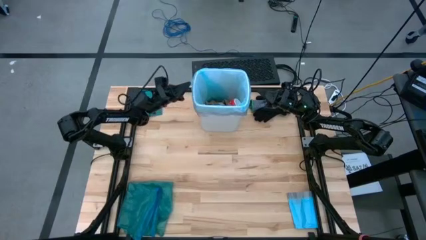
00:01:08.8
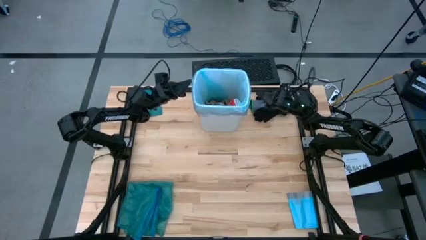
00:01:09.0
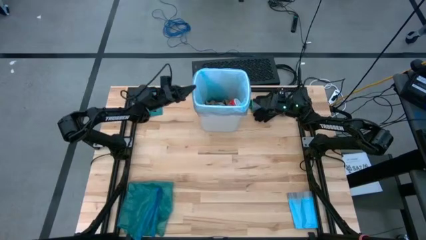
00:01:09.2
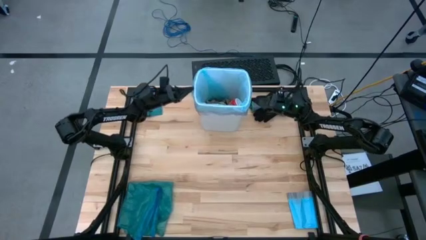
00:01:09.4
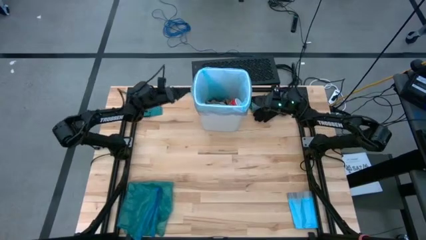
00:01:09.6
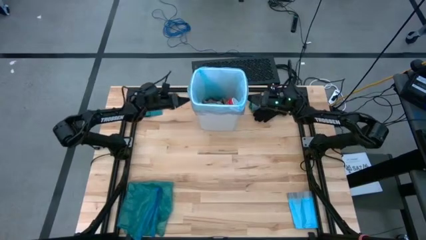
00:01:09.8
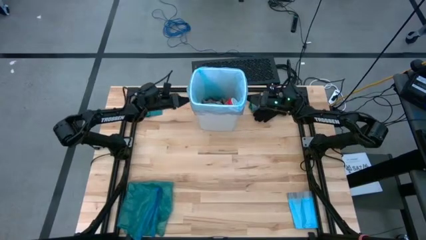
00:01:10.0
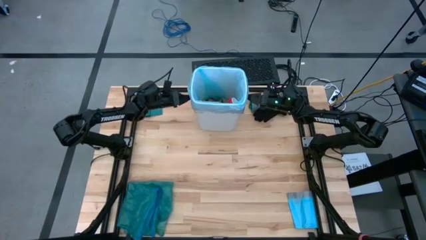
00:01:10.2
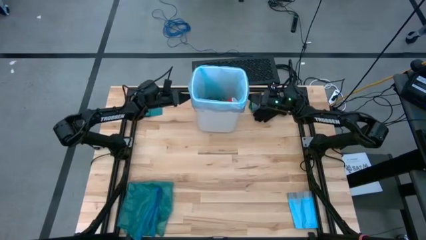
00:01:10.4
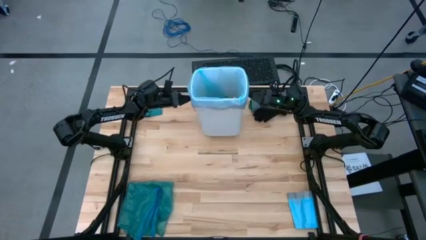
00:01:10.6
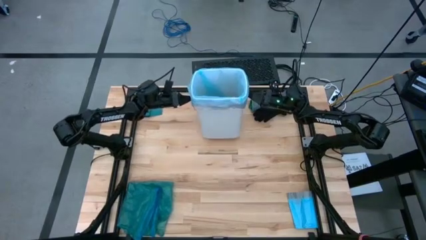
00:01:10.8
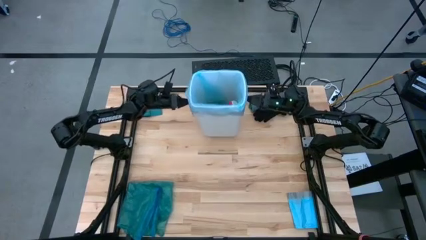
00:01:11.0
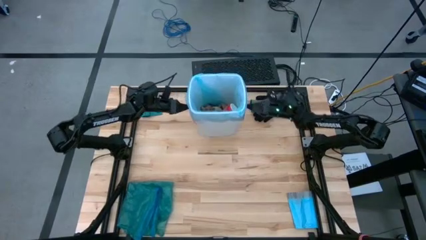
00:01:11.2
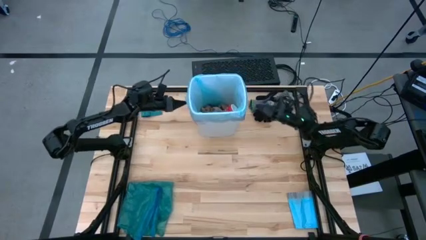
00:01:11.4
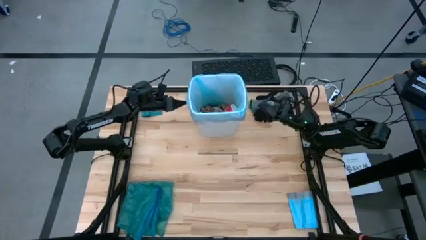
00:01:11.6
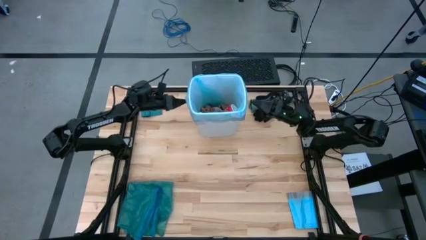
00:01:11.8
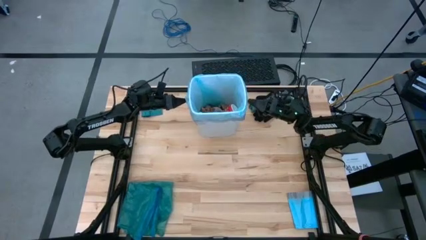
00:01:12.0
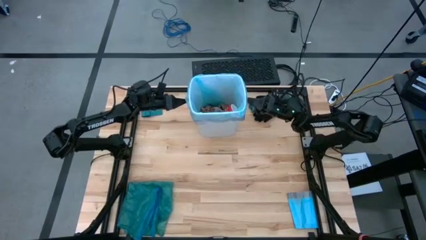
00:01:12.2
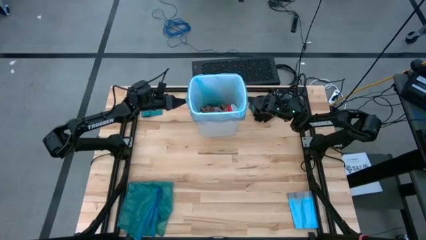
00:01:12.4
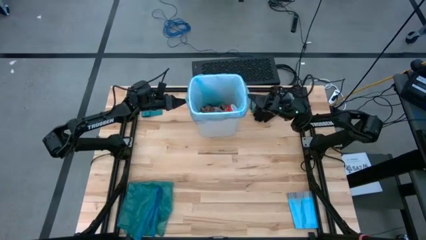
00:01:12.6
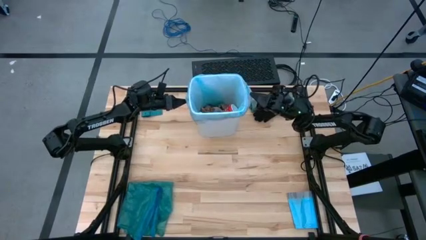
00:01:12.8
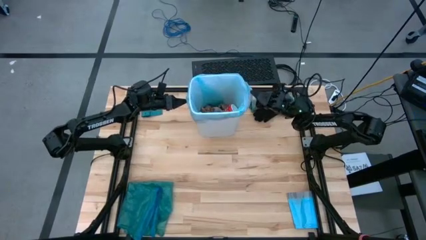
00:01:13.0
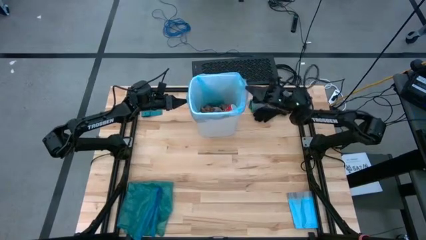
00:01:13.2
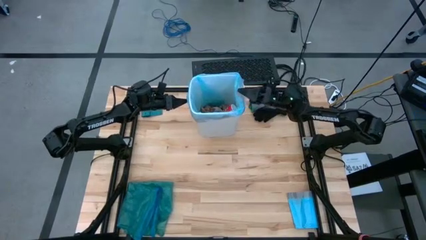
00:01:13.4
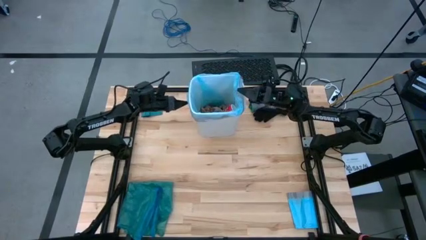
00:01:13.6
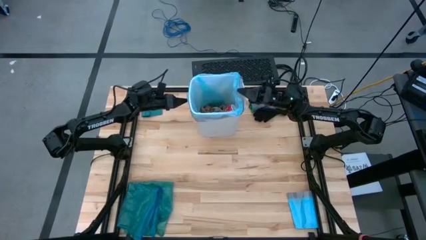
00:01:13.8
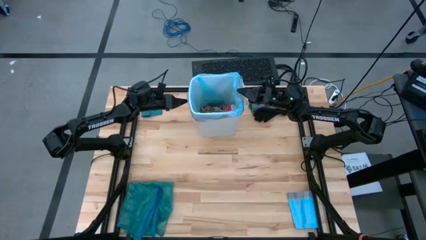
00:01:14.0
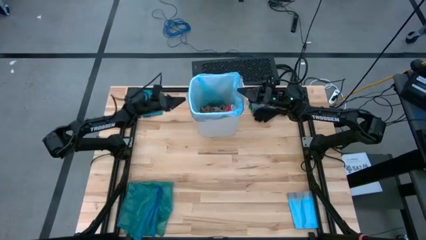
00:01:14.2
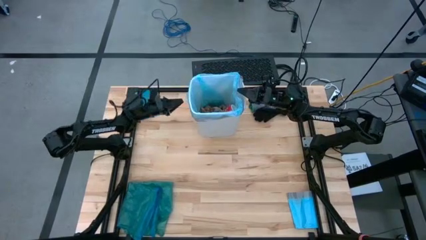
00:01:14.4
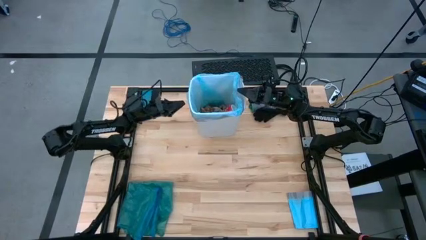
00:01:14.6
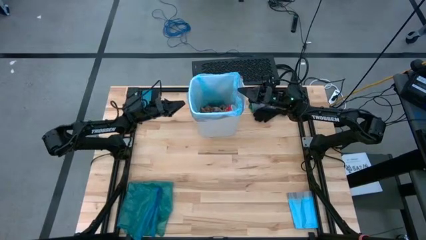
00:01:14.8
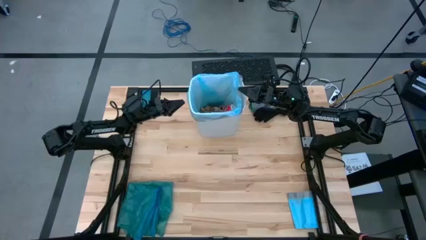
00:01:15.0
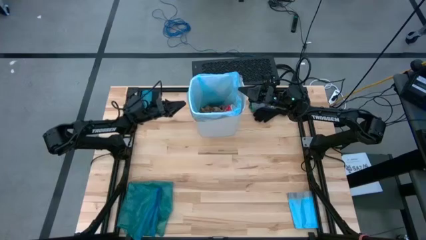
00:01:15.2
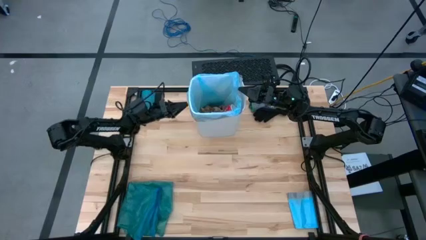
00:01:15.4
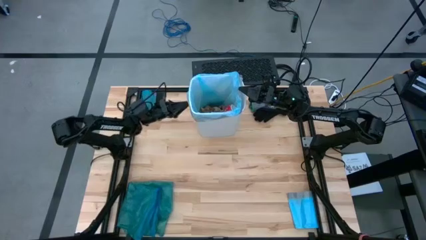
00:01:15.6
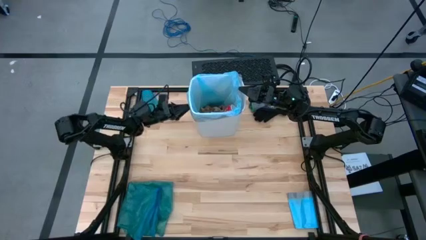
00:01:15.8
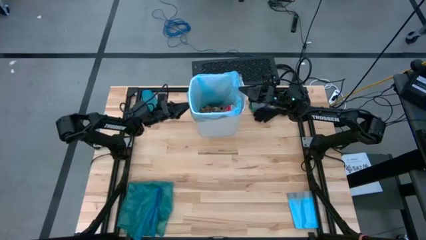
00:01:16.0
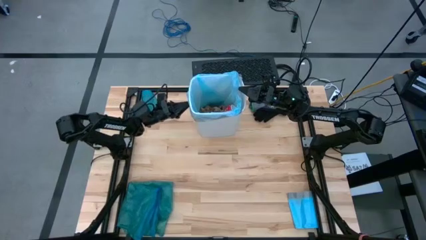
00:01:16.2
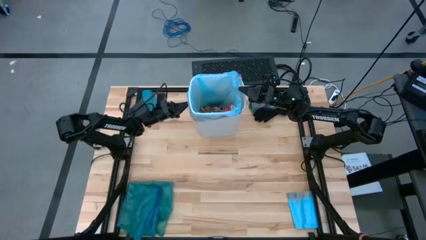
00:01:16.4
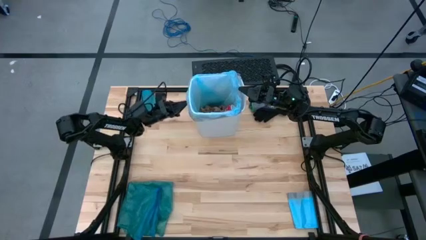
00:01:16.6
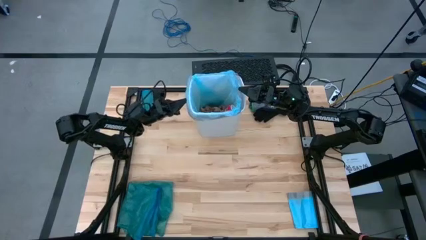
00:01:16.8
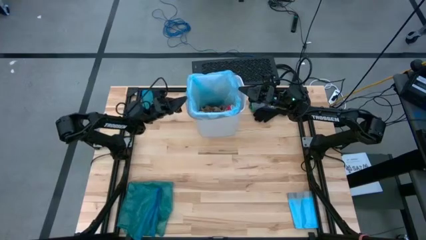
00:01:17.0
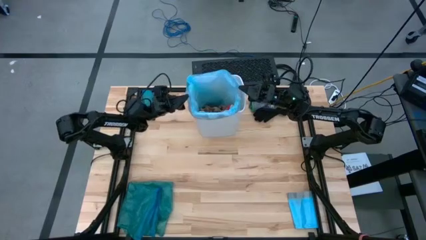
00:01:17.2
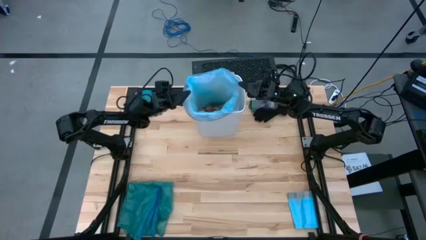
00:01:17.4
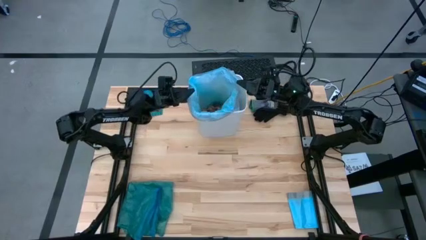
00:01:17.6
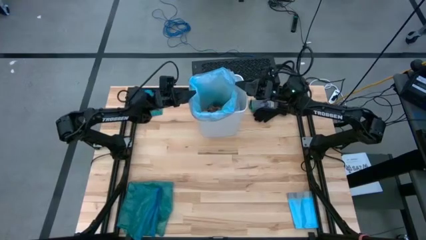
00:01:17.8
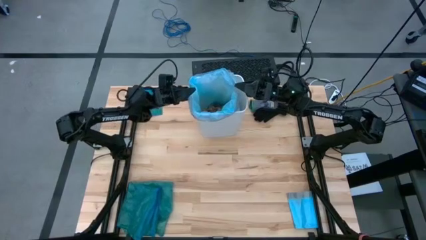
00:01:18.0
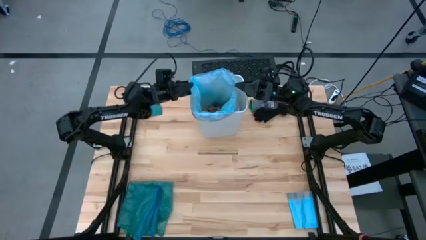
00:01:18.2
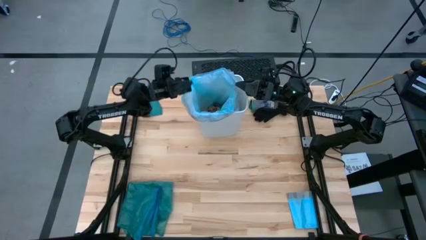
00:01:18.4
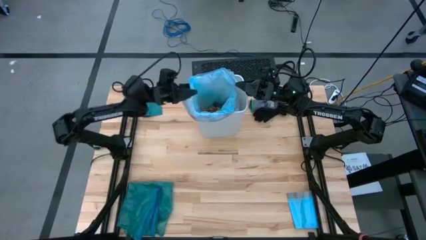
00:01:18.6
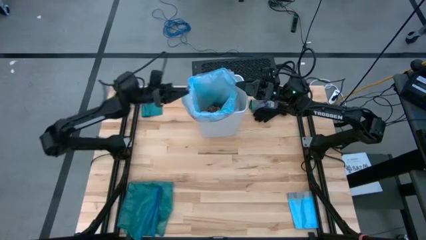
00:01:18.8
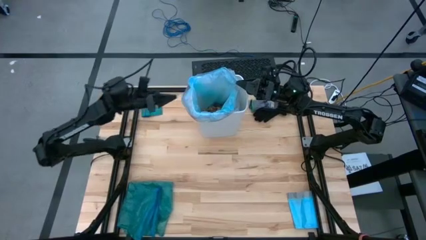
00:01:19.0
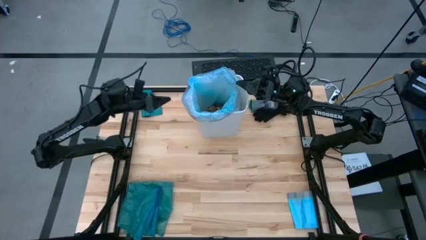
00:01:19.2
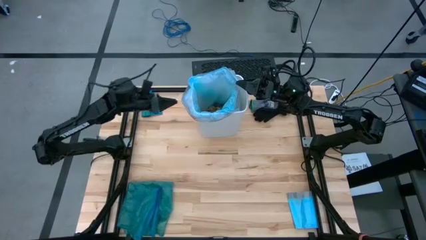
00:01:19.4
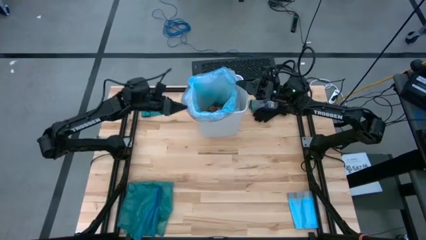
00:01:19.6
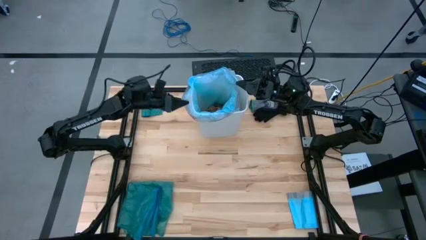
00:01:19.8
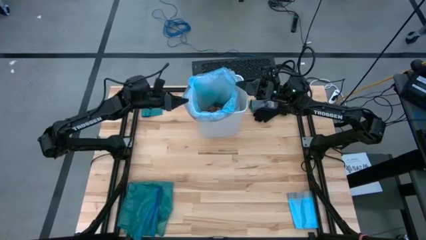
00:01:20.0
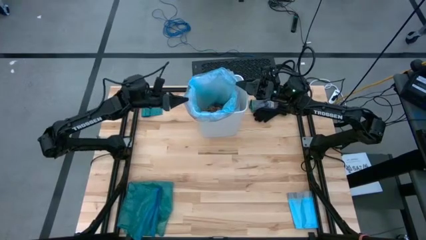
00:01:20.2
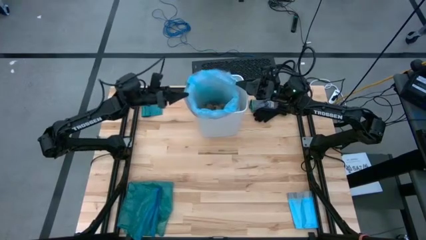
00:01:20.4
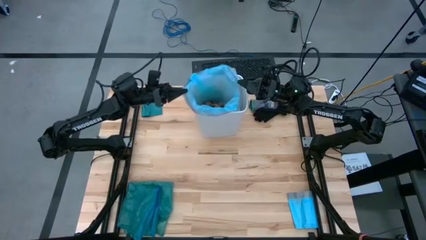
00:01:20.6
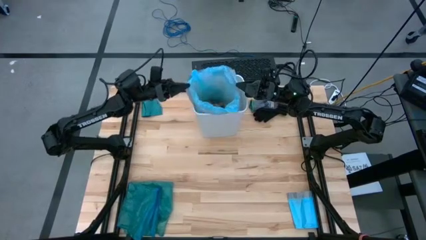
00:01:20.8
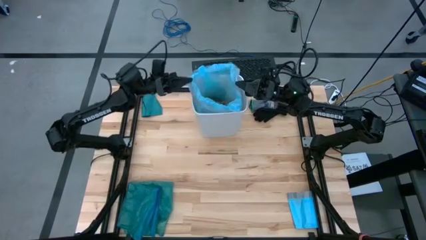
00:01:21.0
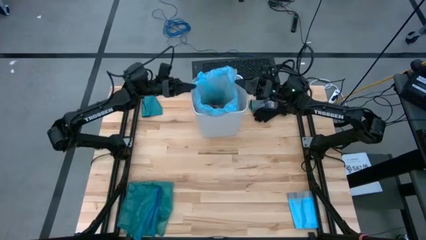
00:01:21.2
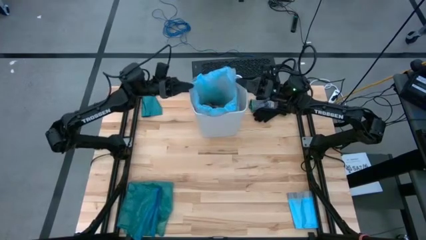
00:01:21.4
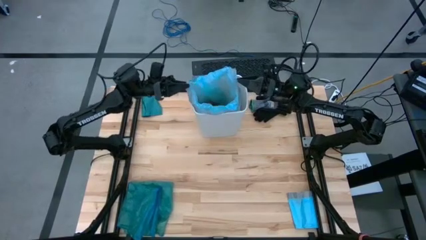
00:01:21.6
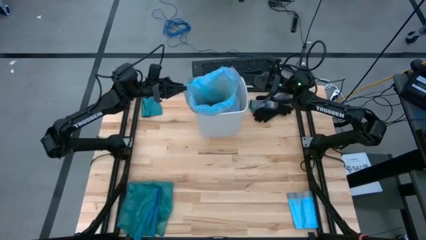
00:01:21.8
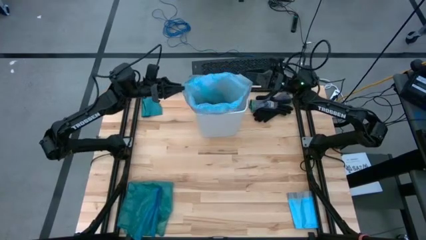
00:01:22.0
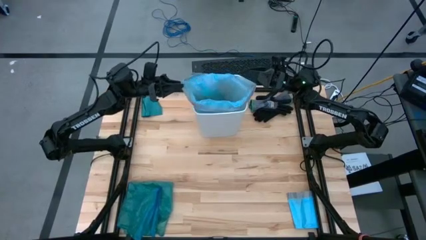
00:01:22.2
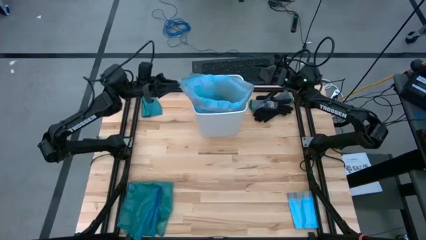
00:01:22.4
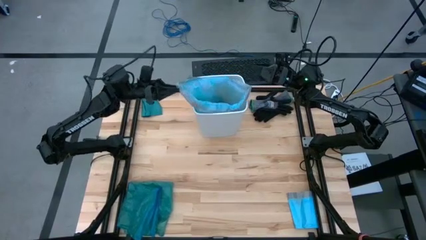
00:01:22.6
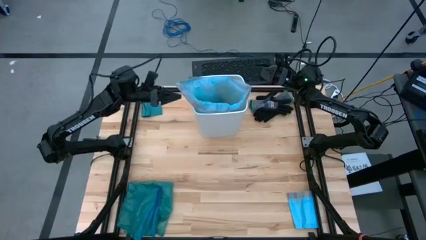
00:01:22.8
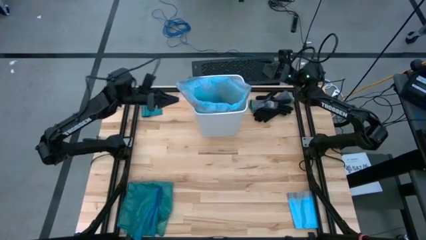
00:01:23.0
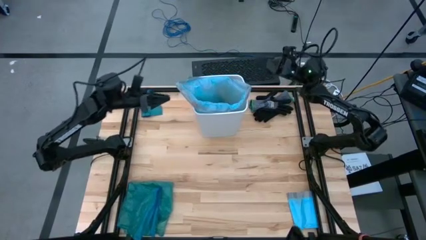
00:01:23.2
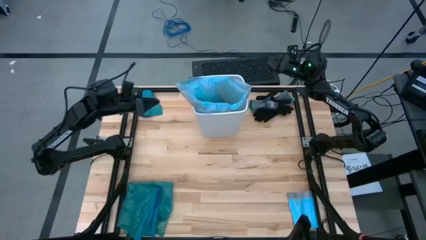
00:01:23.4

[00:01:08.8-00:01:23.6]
Task: place trash/remove bag and relplace
Remove the light blue trash bag from the white trash bin
